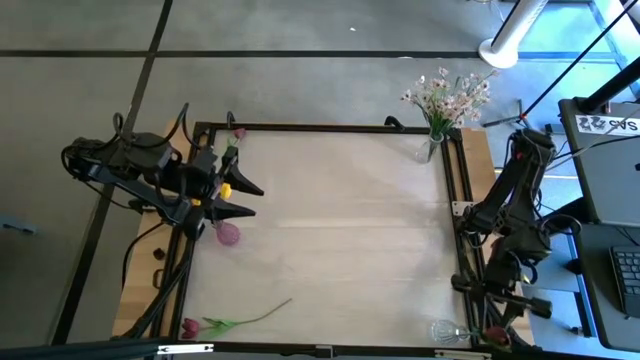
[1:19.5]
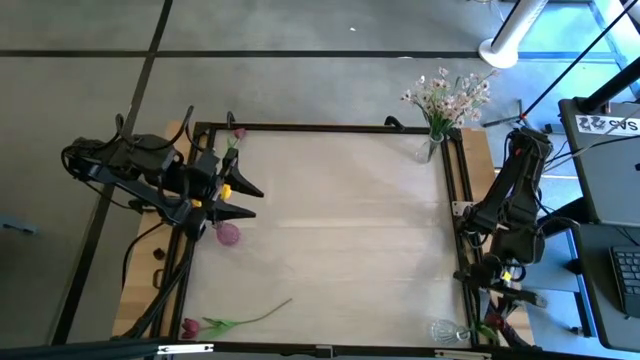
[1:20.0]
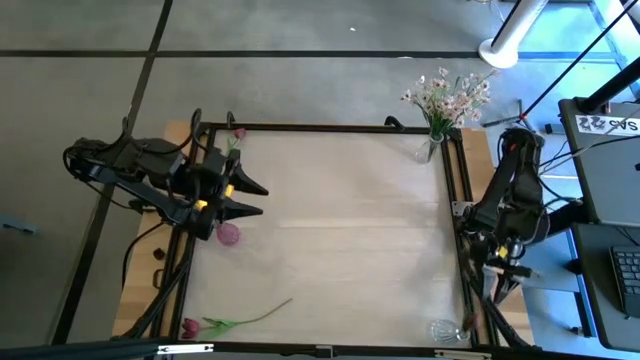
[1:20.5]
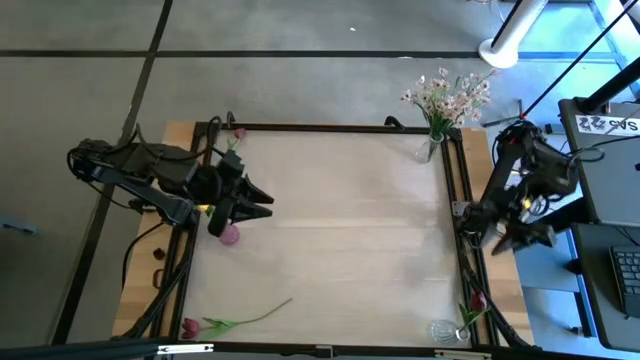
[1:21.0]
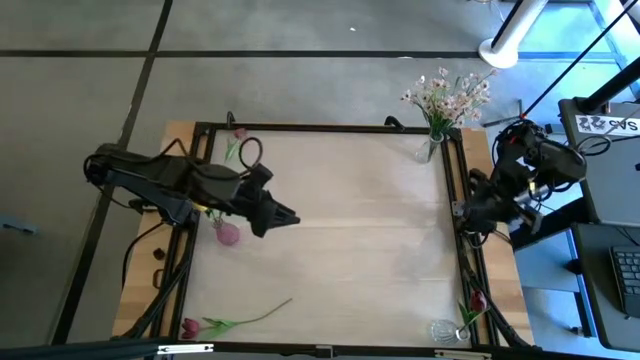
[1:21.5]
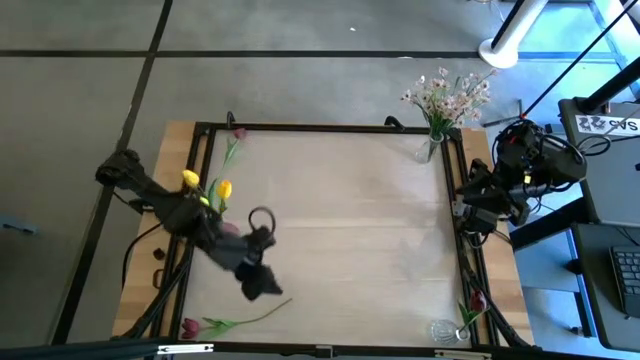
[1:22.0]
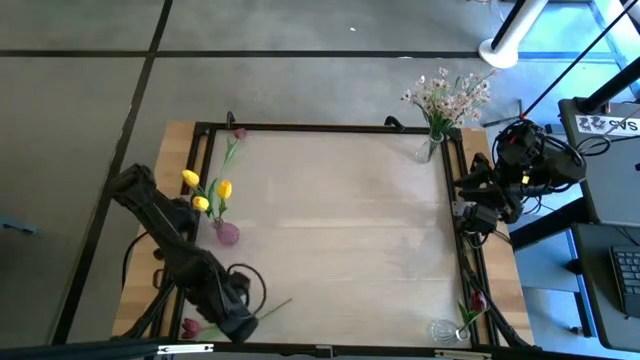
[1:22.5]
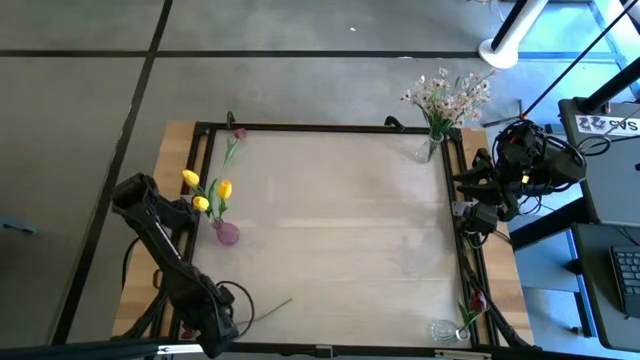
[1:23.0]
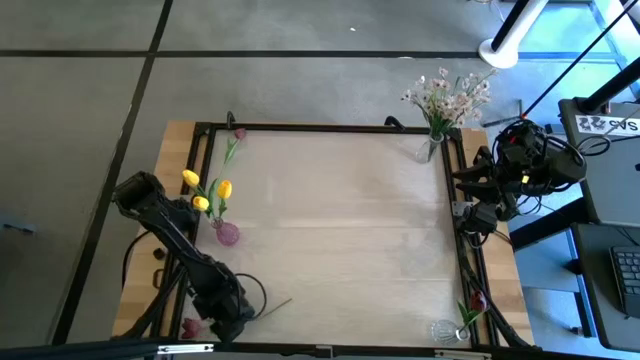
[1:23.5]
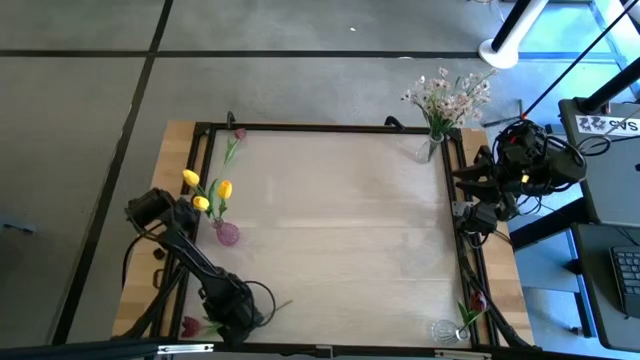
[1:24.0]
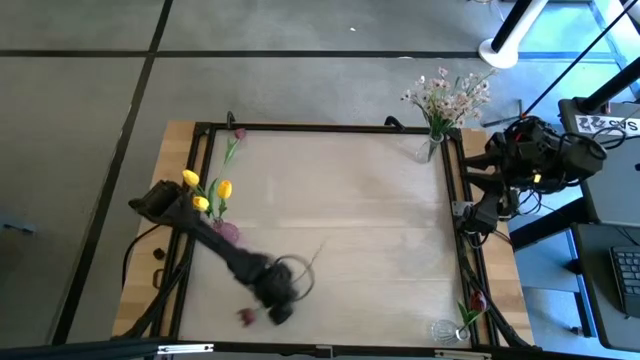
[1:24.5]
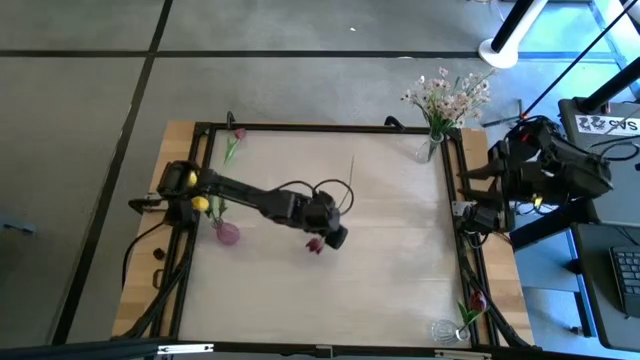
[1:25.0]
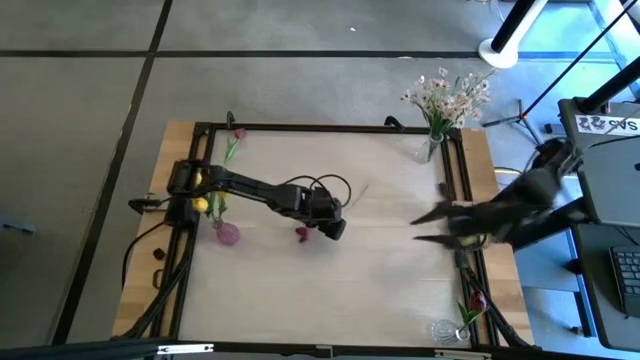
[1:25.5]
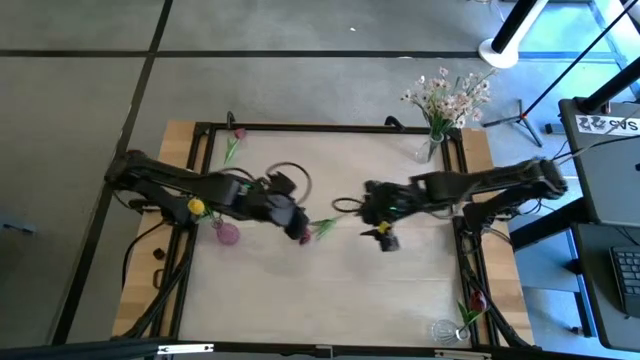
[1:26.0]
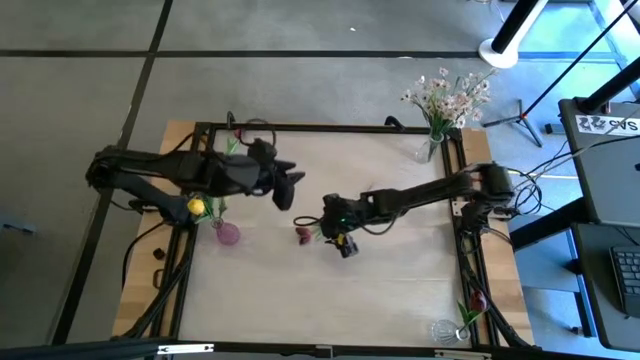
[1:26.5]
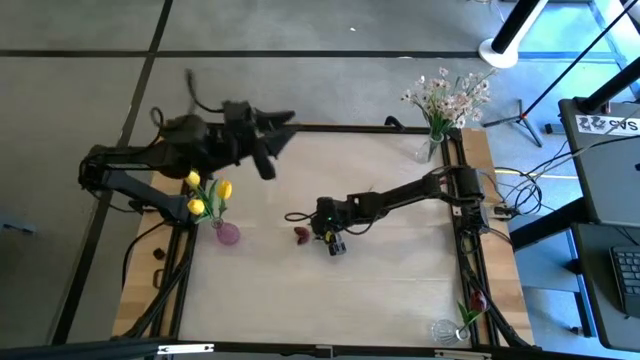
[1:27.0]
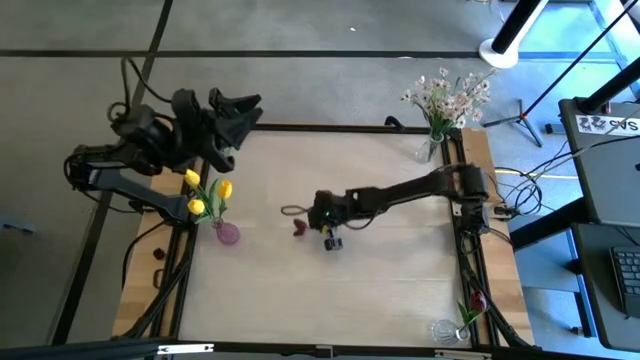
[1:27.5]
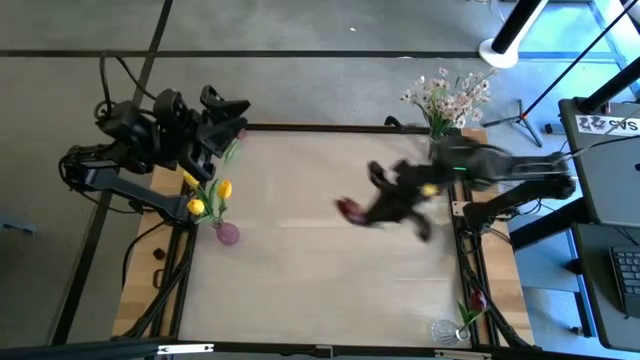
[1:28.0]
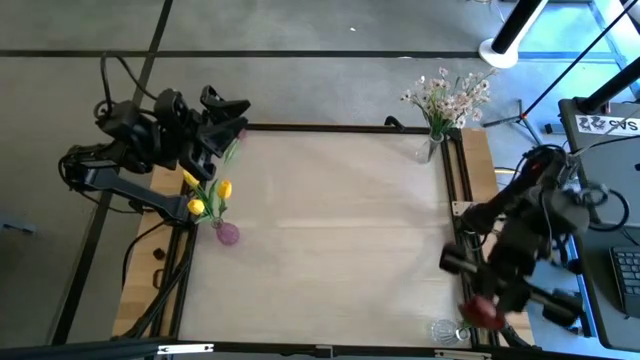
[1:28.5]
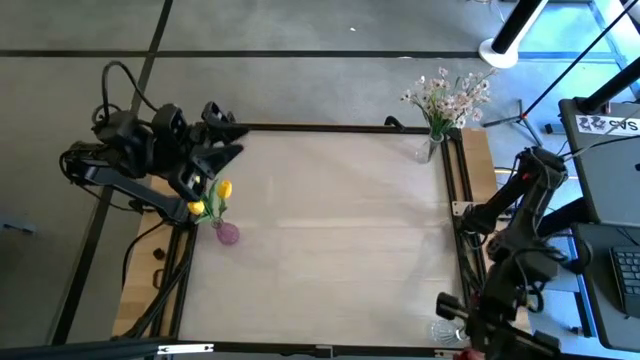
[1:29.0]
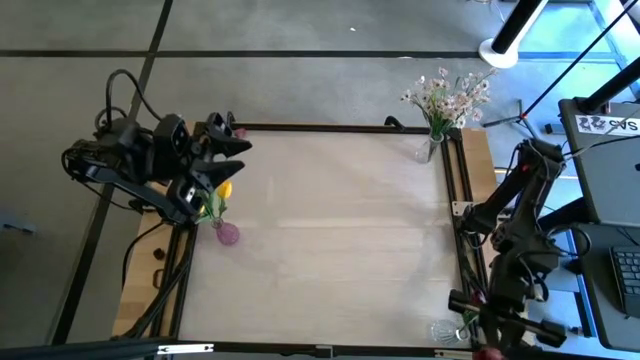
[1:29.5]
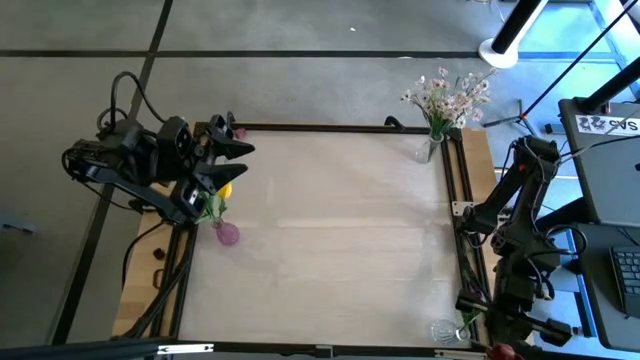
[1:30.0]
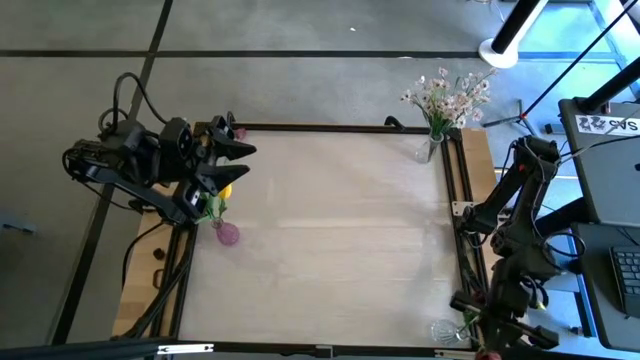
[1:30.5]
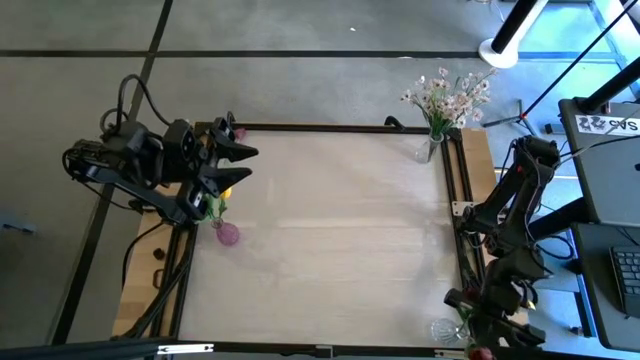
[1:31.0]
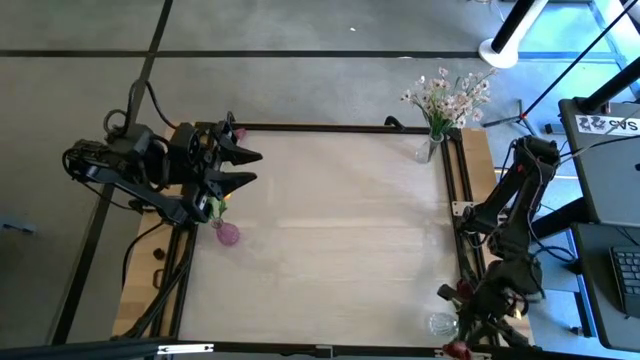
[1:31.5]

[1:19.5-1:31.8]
Task: Sort flowers into vase by color
Put the bottom red tulip into the bottom transparent flower vase

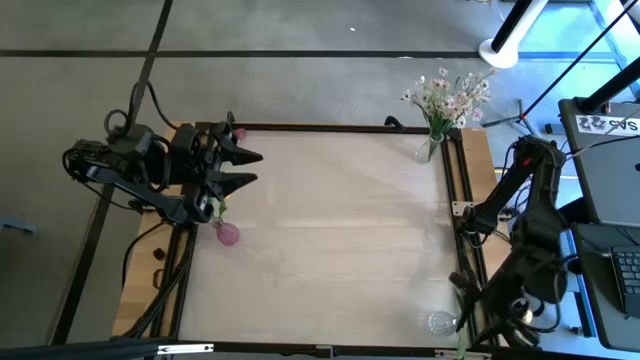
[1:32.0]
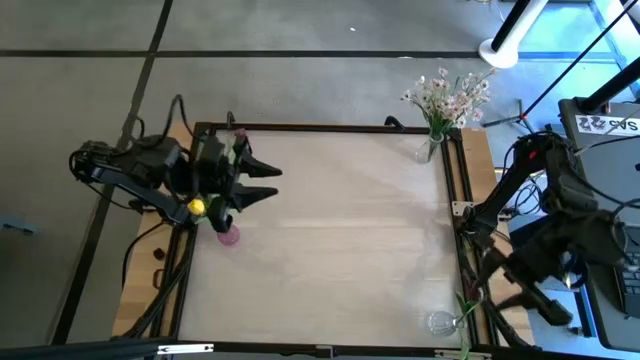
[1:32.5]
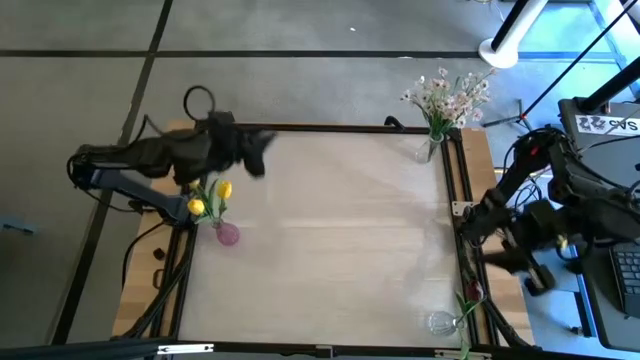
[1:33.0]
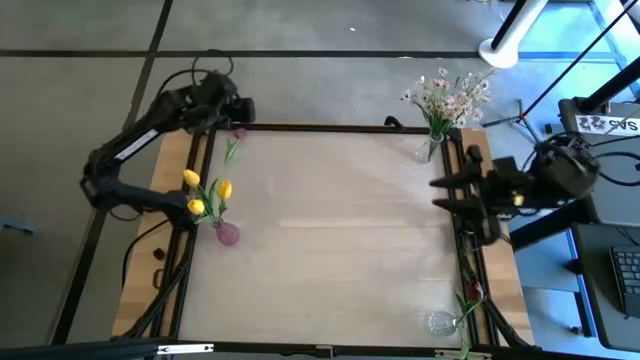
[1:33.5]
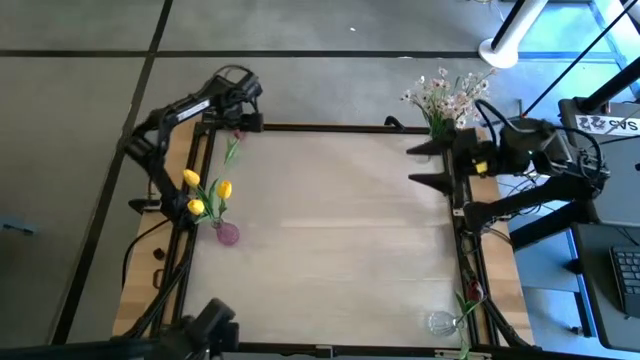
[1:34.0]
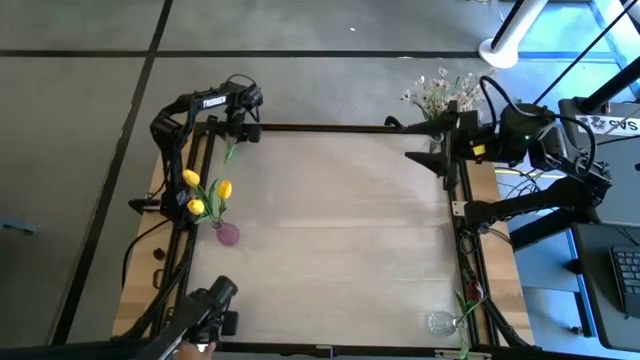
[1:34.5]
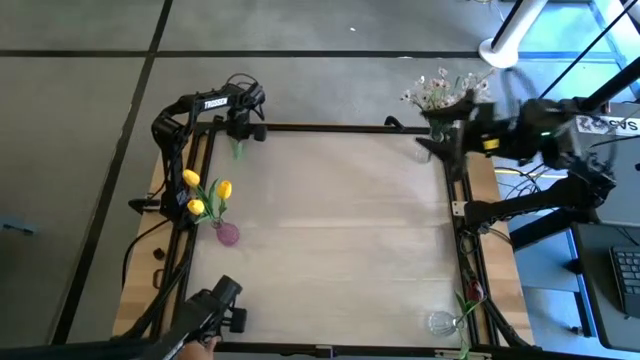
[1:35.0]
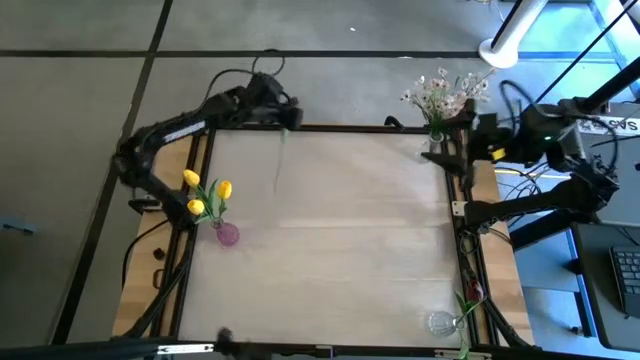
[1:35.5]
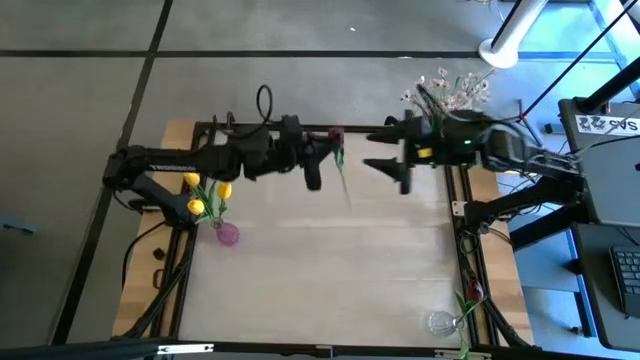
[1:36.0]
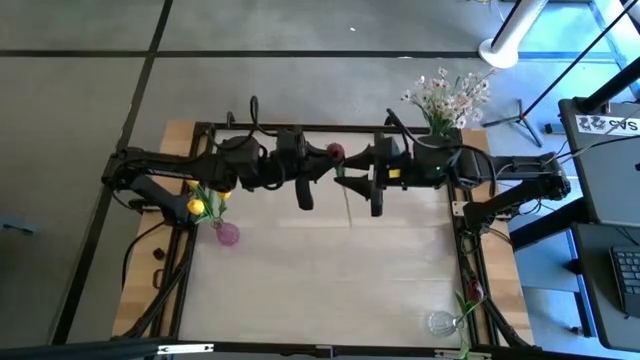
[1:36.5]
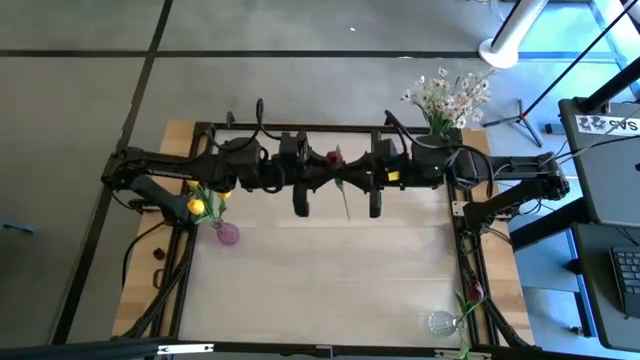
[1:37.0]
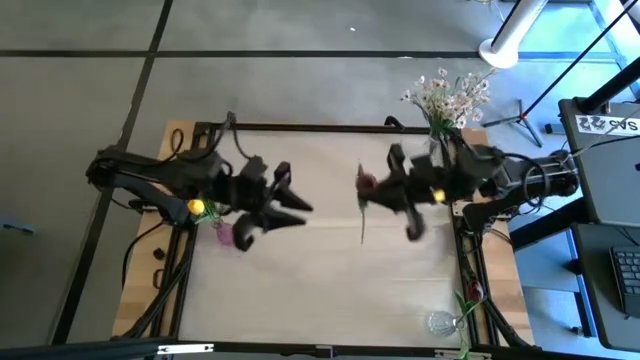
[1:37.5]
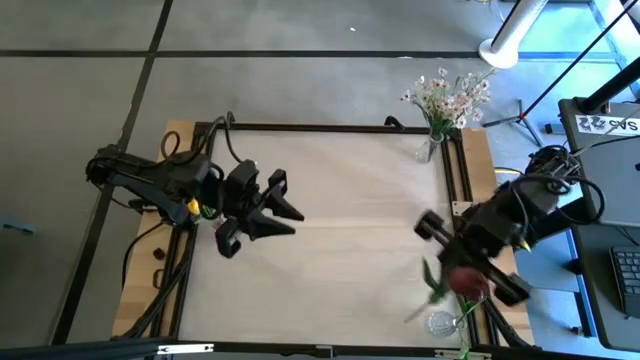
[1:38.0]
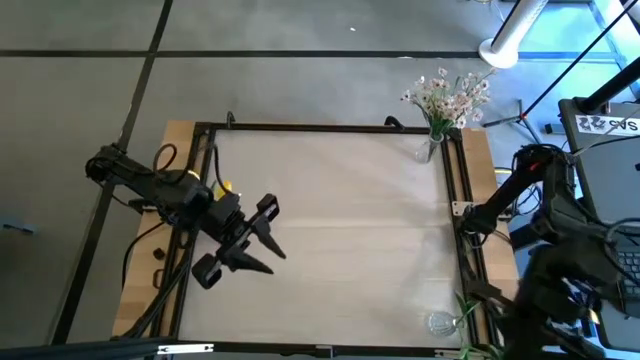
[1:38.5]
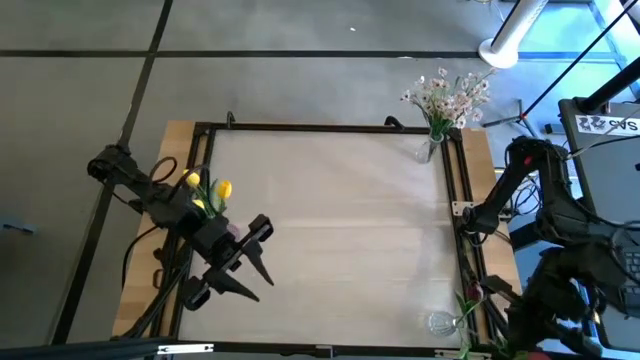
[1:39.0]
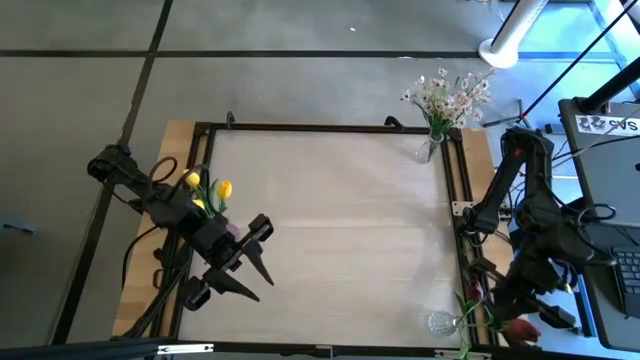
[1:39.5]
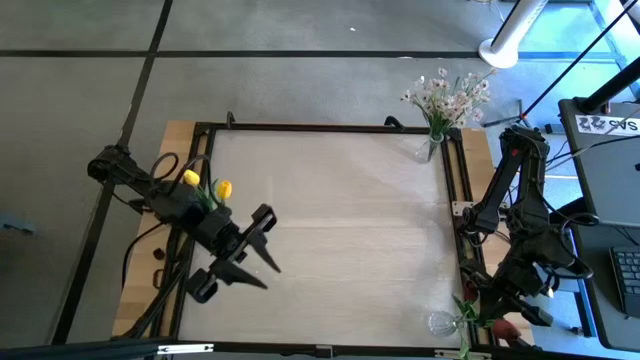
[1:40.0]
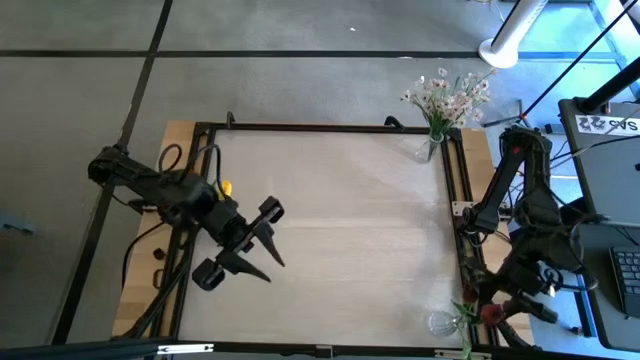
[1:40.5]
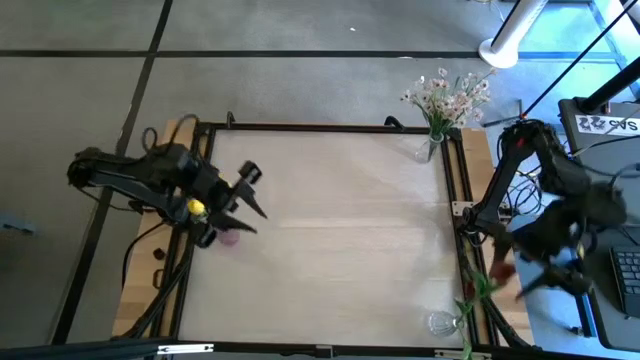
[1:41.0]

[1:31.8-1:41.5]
Put the red tulip into the bottom transparent flower vase

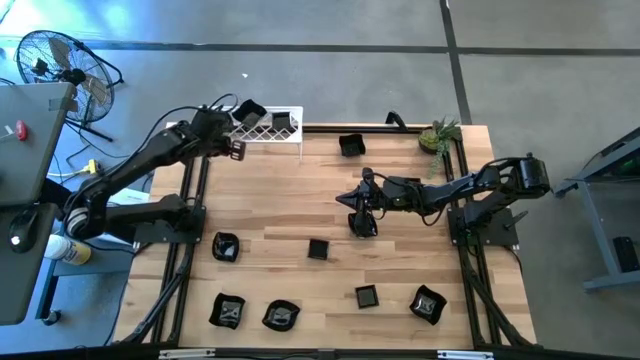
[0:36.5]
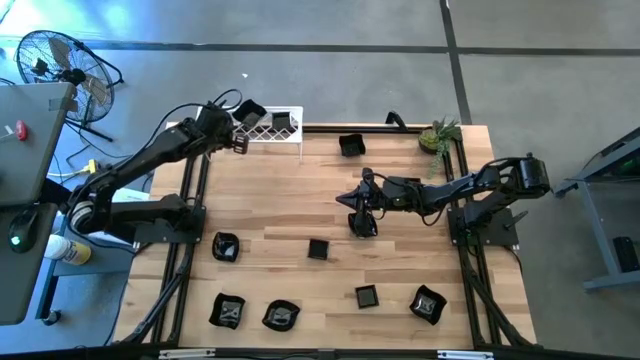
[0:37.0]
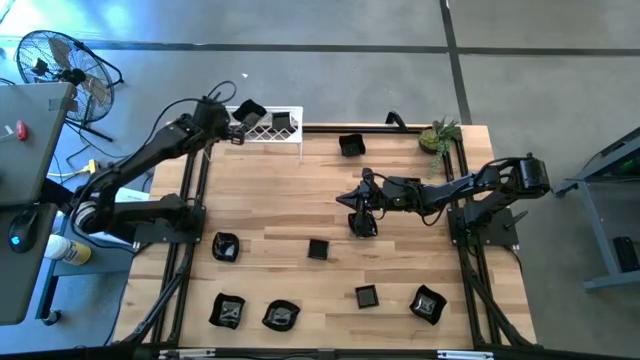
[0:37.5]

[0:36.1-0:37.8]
Task: Pick & Place Mini shaped plates
Adjust the black leaf-shaped plate on the shelf
